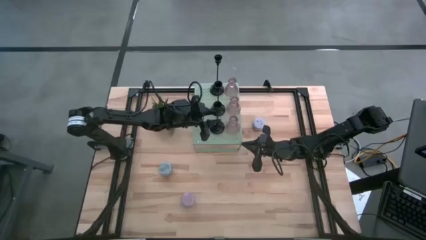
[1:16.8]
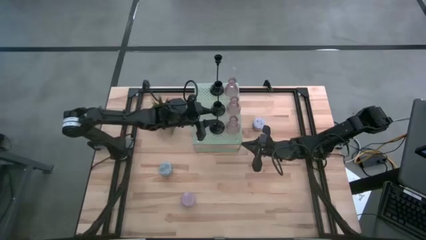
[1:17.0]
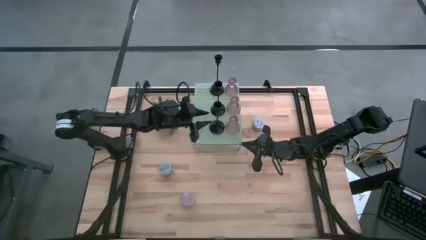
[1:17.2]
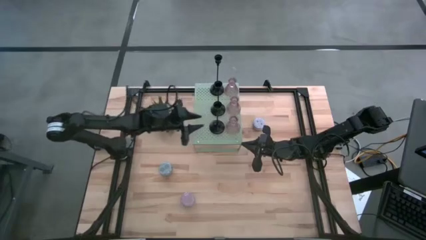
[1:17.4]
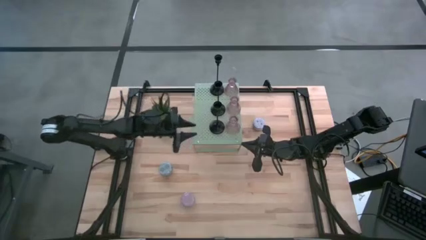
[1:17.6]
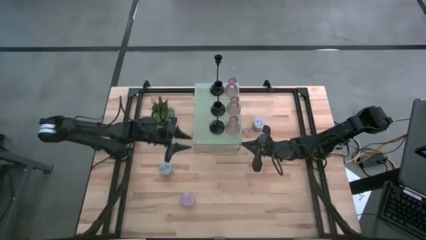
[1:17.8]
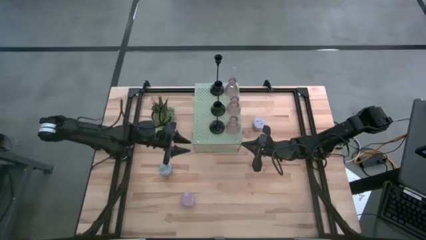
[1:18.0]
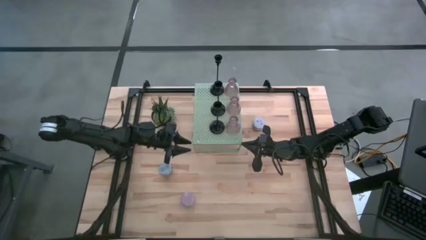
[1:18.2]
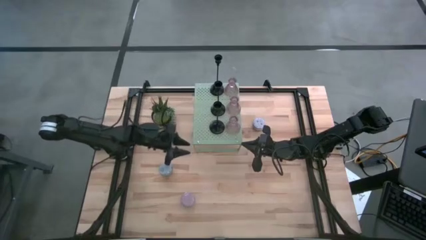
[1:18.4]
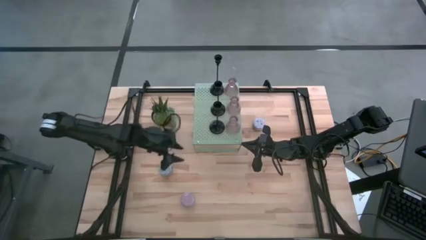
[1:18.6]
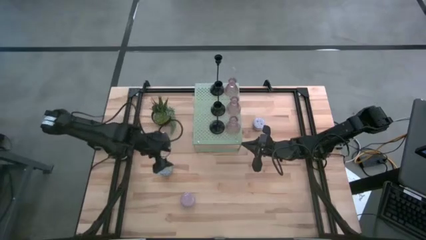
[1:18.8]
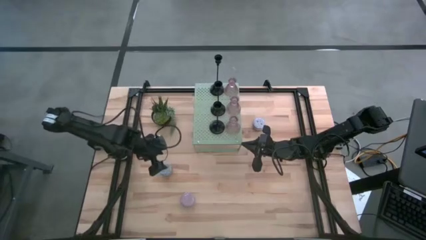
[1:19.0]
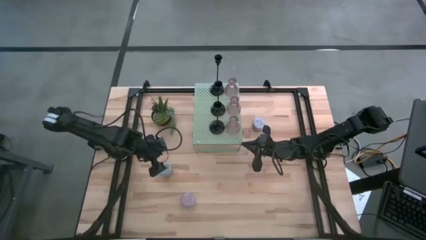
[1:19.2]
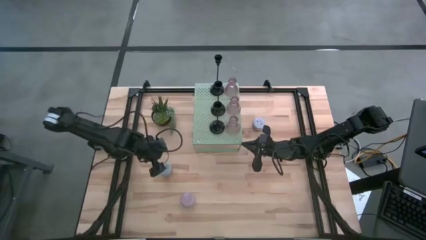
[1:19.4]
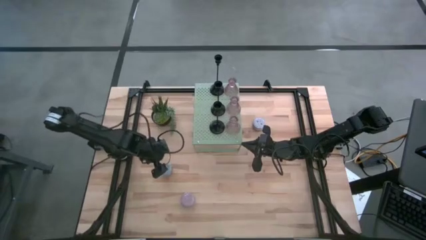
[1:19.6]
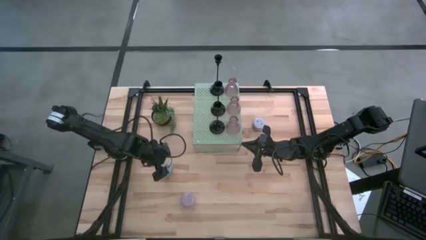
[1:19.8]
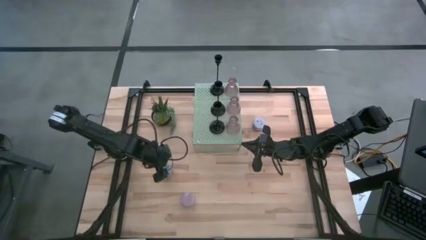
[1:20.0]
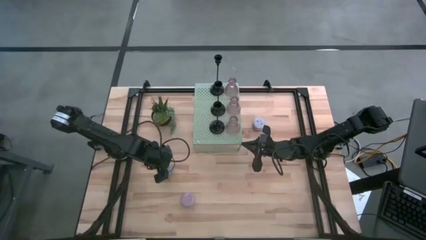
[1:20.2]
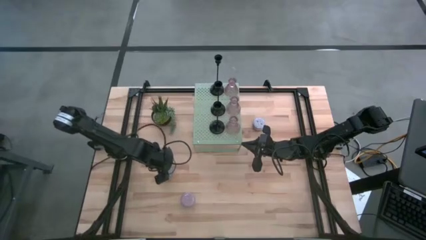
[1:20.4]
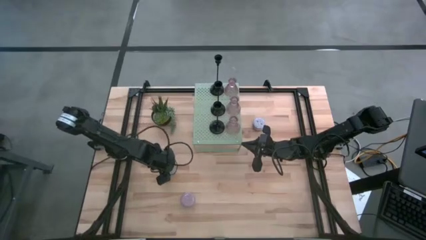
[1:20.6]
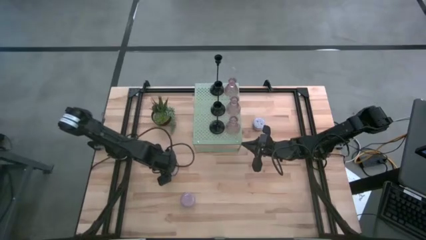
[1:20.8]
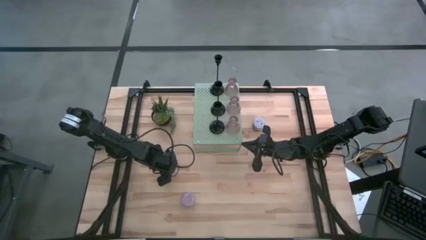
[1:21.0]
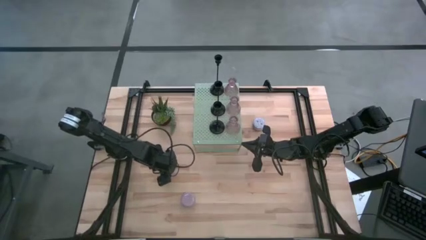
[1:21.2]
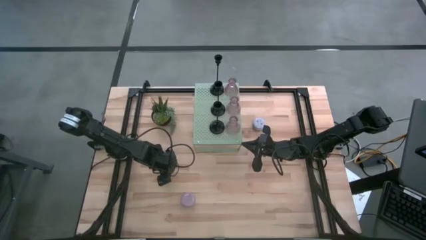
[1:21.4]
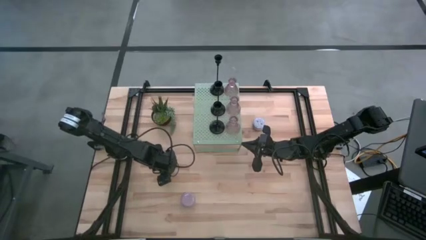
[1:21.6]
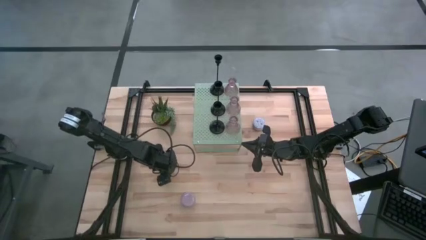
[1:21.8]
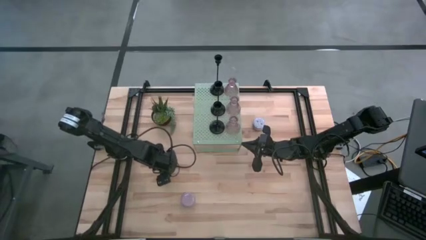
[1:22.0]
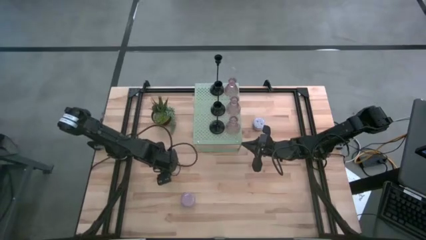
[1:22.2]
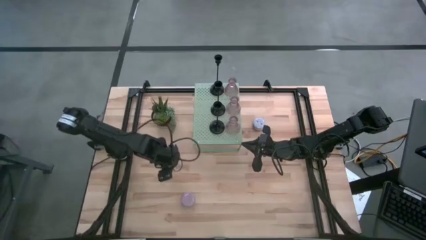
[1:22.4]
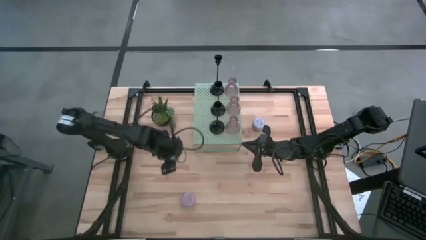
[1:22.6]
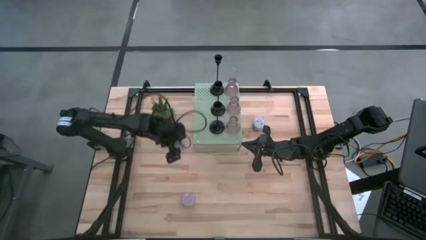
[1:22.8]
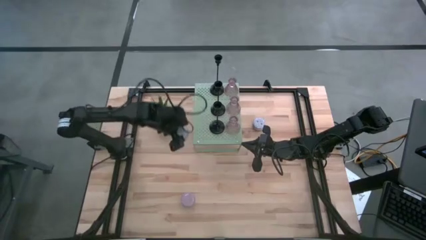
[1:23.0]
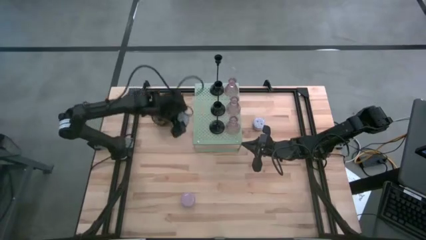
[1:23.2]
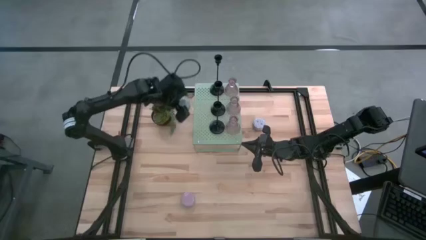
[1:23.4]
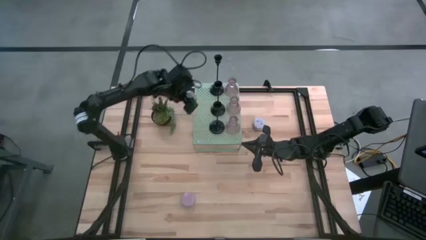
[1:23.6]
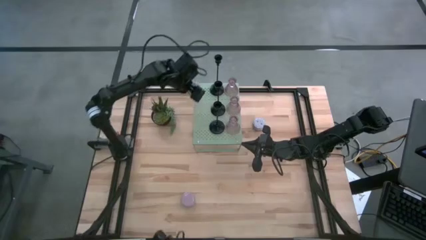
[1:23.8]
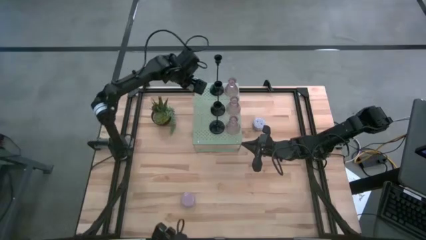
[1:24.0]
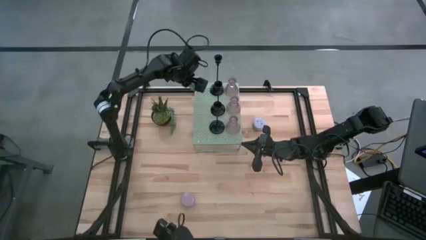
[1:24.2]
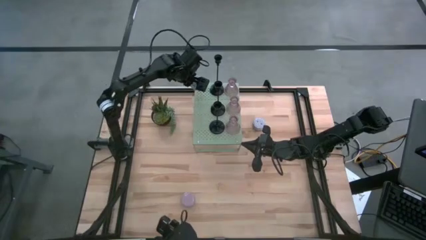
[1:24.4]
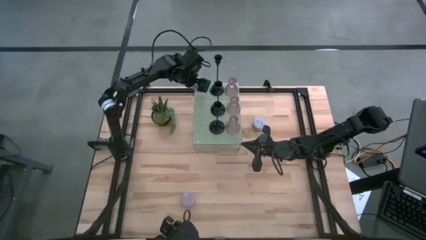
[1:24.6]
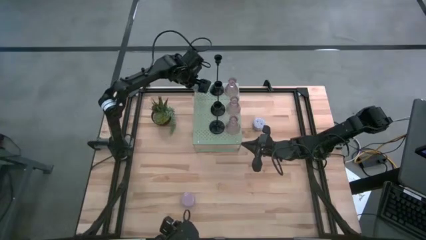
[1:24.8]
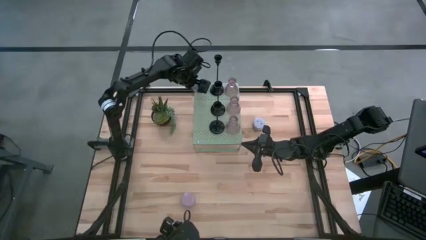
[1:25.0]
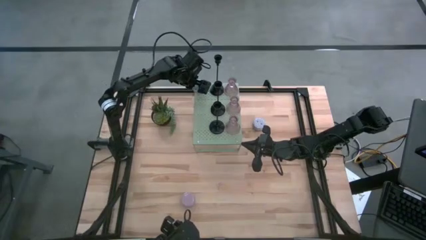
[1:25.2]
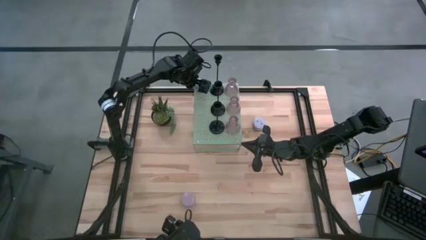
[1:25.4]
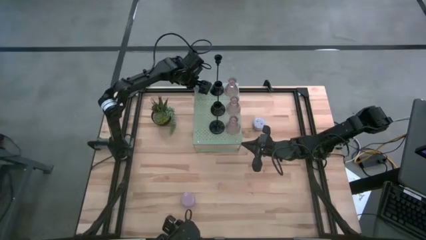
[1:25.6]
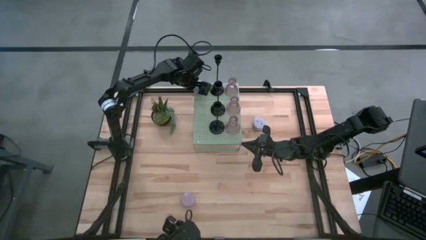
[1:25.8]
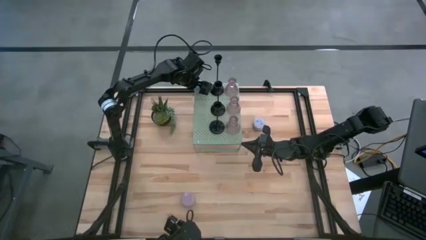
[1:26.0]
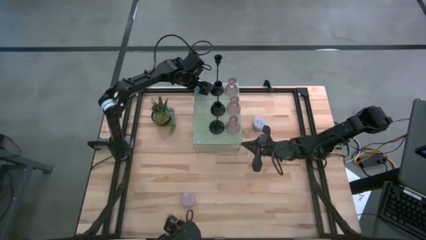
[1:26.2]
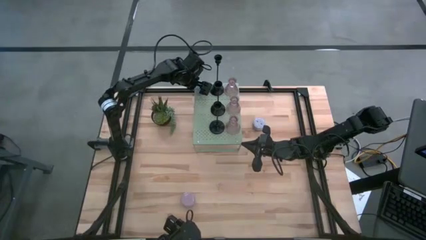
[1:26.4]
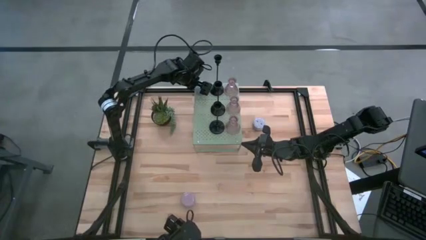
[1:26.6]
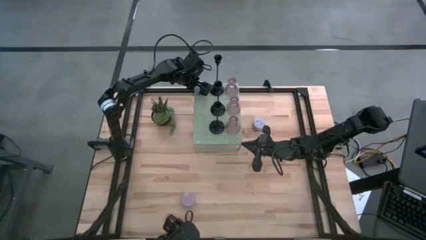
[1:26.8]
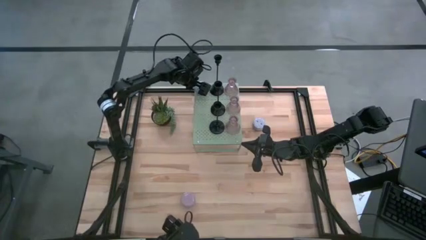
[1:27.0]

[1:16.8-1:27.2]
Task: Pick & Place candle stick holders
Put the blue patterned scented candle on the shelf
